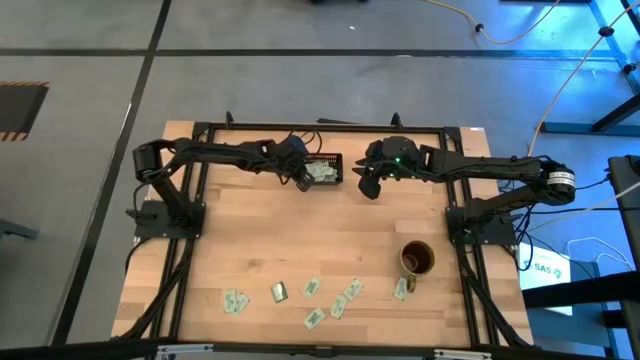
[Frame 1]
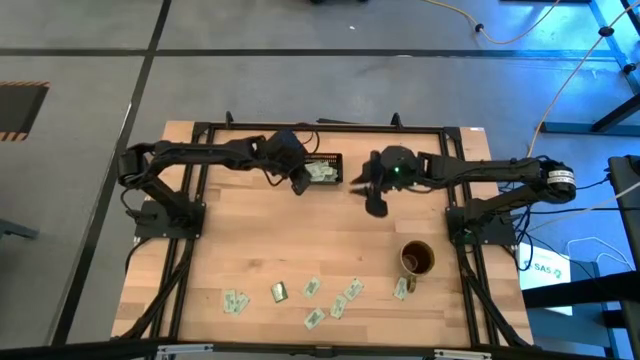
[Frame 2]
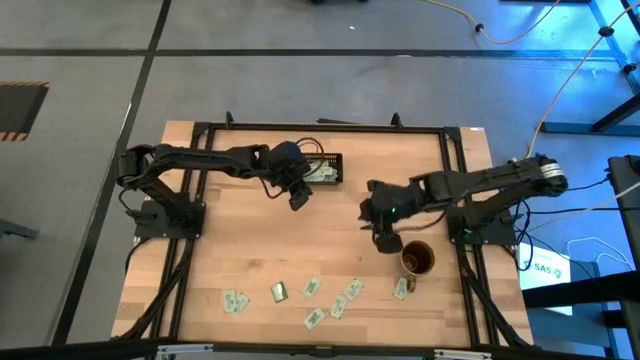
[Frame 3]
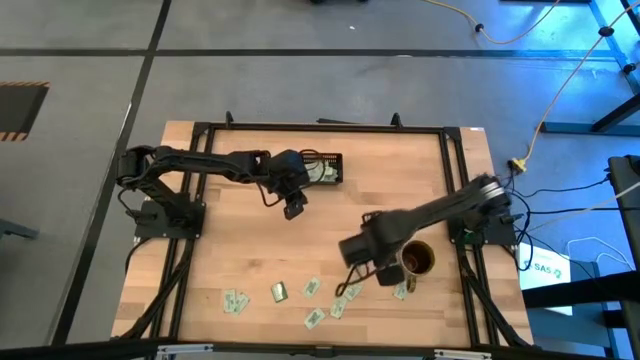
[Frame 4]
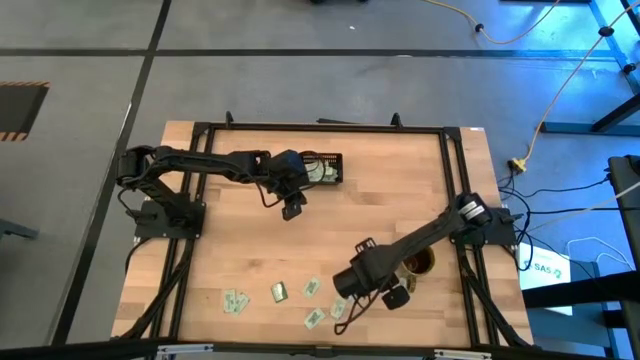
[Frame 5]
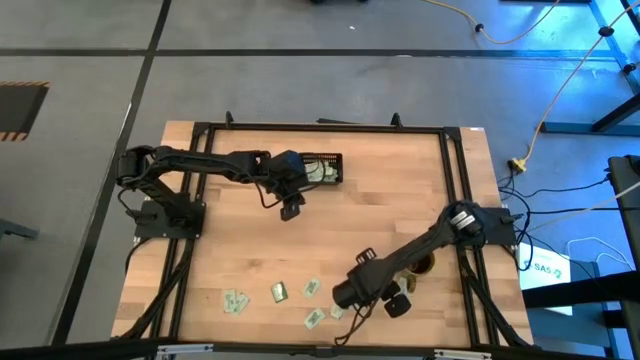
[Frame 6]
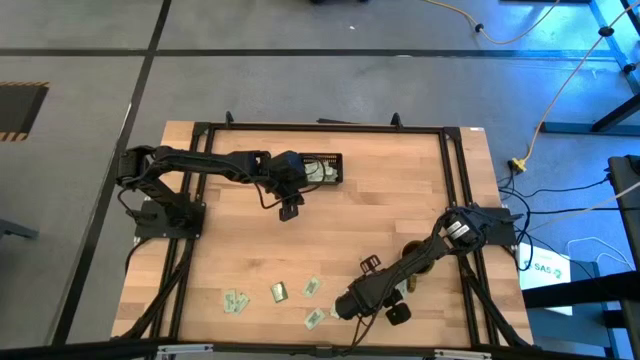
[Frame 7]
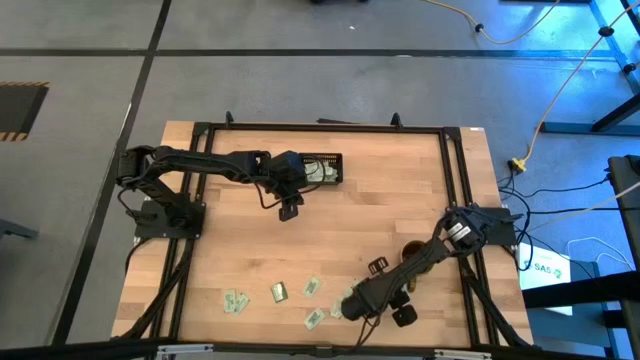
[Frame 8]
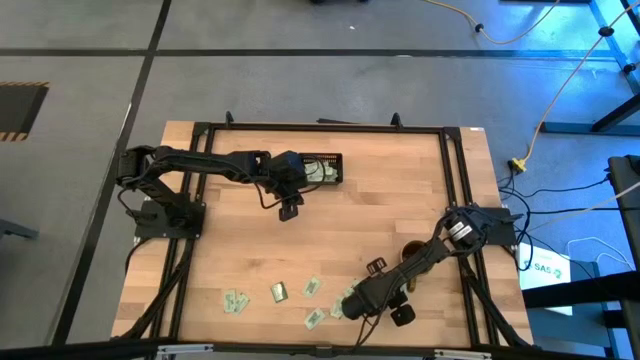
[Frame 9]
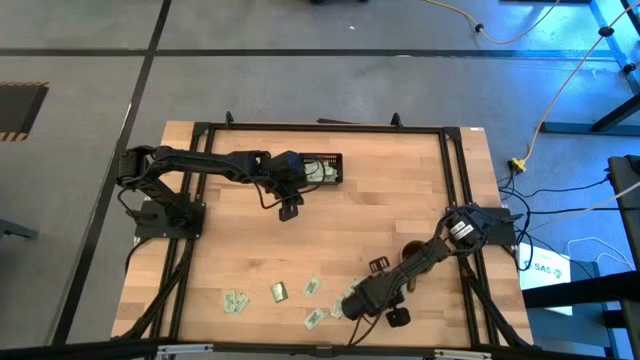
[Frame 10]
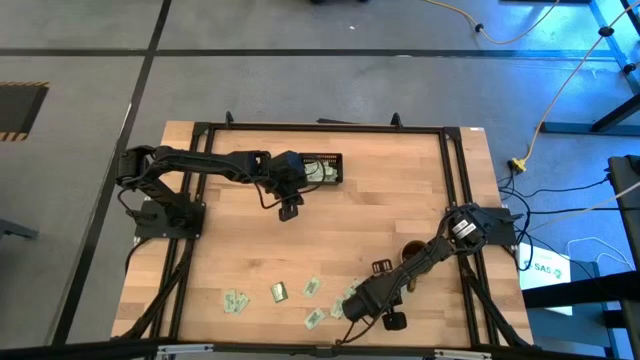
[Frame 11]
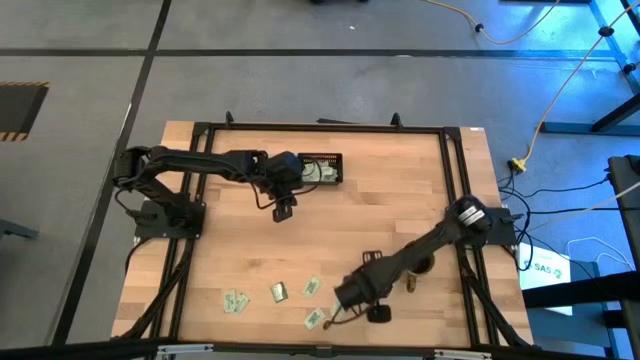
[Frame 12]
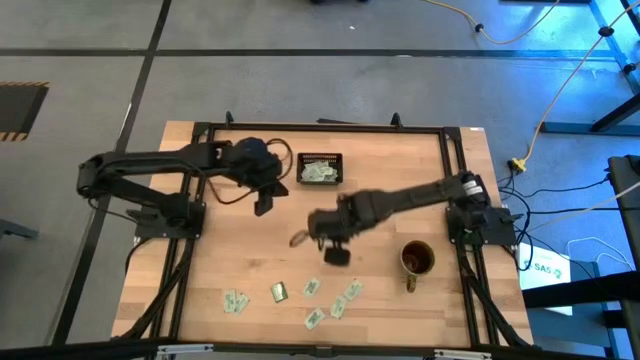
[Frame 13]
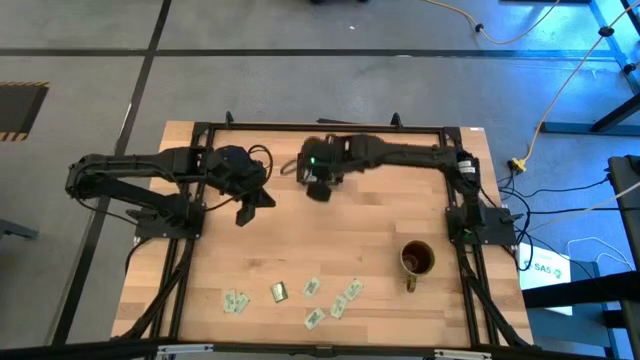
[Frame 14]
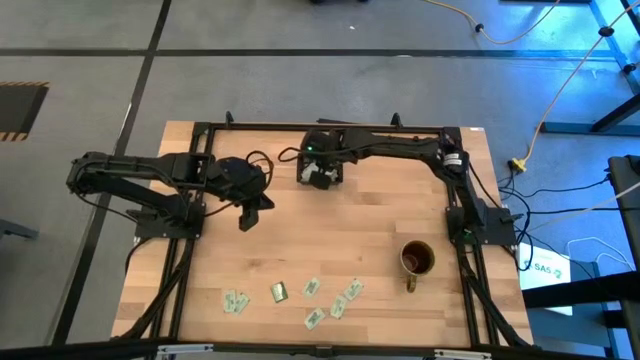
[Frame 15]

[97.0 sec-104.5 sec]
Task: Pick and place Stevia / Truvia into bins
Put the white stevia packet into the black bin

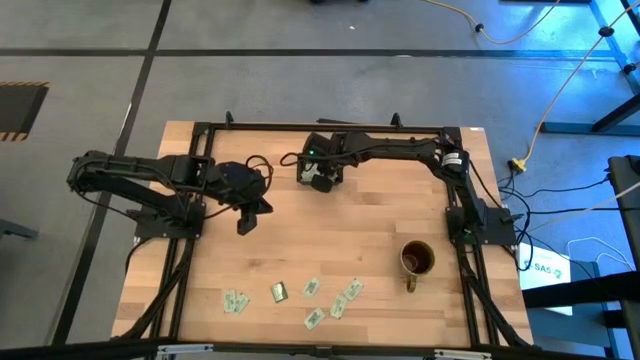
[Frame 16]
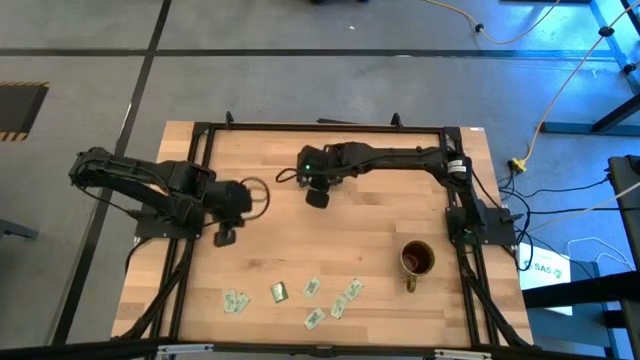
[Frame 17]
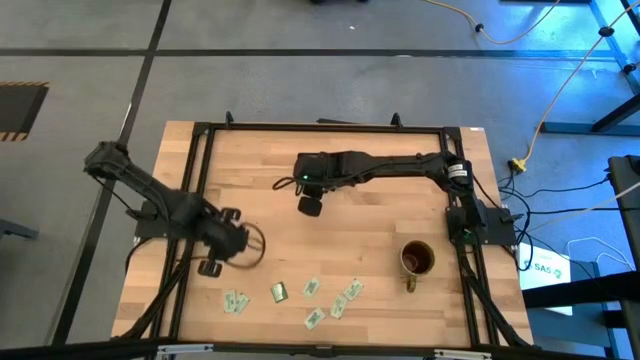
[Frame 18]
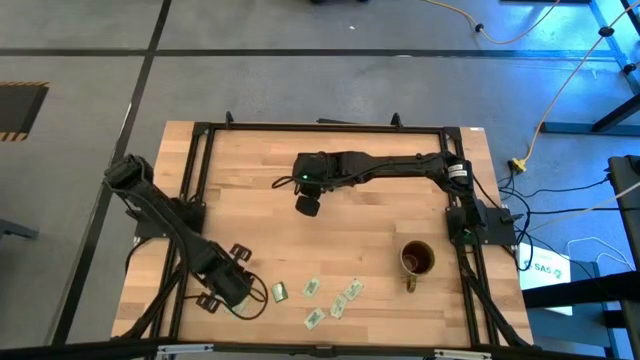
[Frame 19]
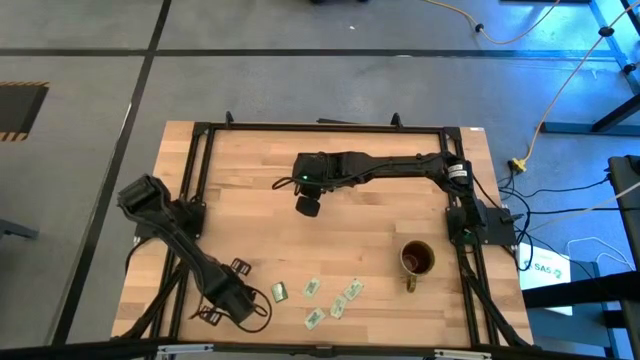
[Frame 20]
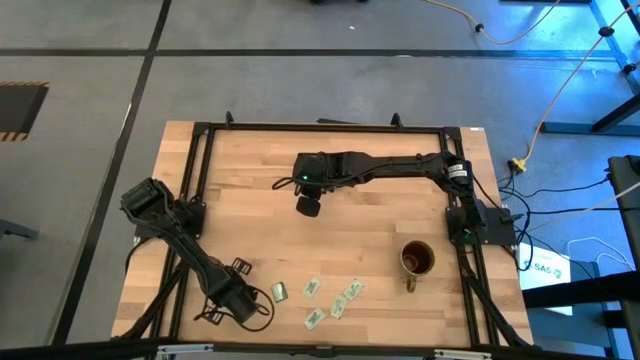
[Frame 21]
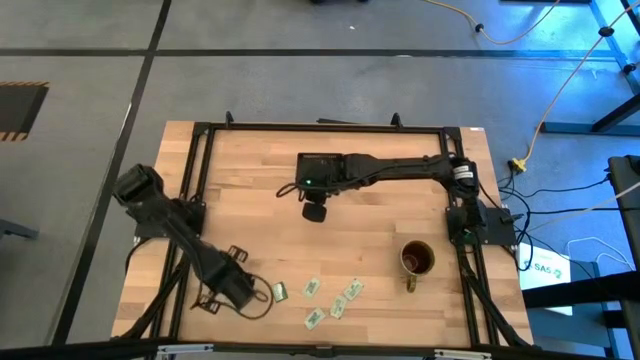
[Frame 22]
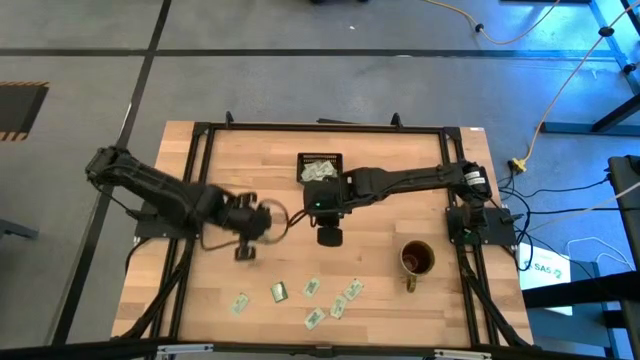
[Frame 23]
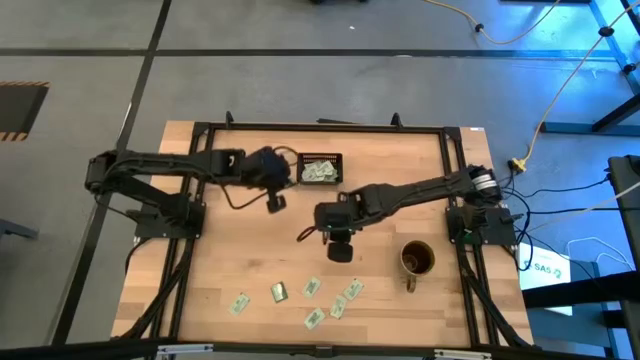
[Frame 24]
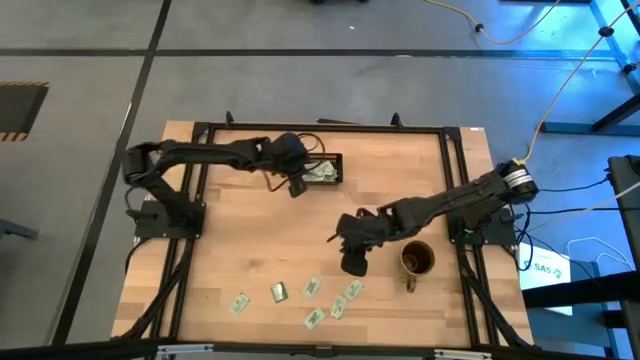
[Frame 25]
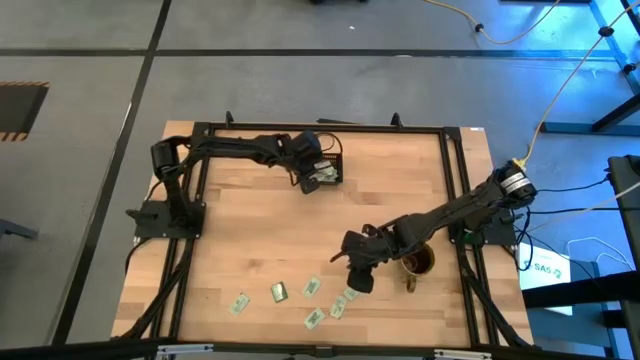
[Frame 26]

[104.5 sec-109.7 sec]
Put the white stevia packet into the black bin

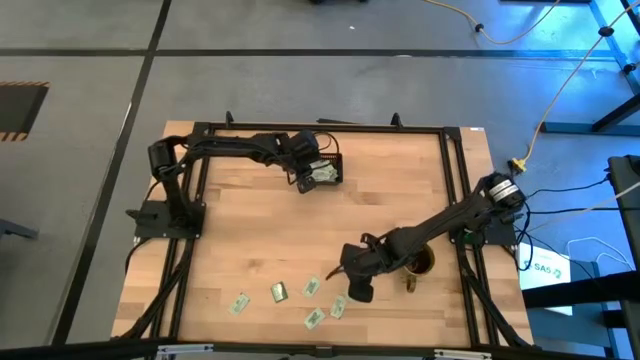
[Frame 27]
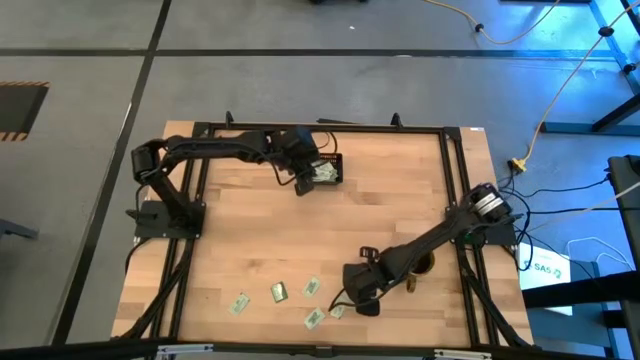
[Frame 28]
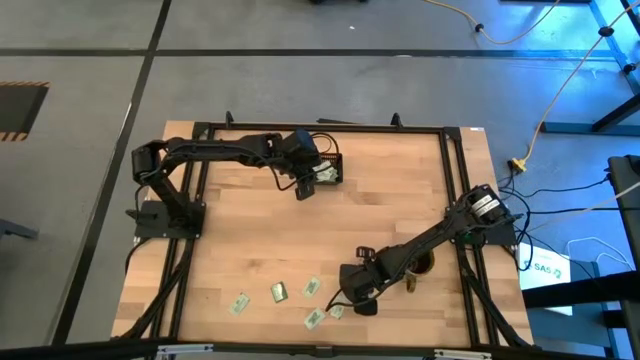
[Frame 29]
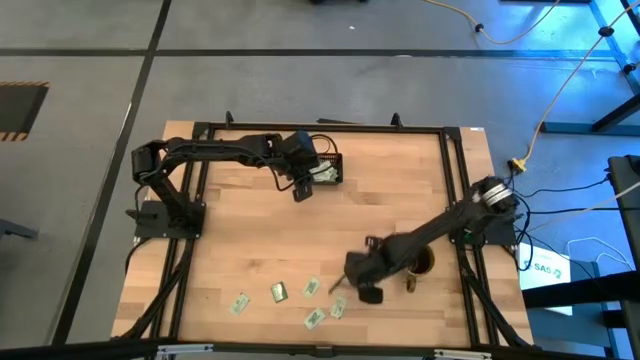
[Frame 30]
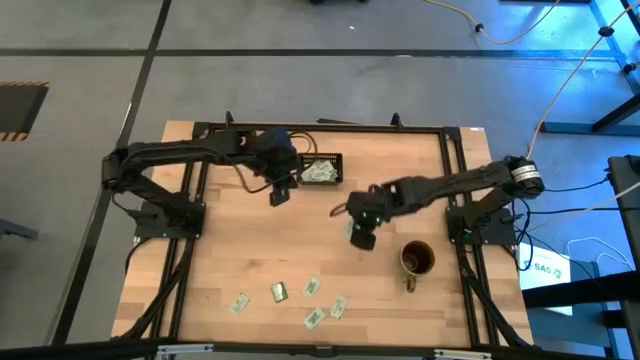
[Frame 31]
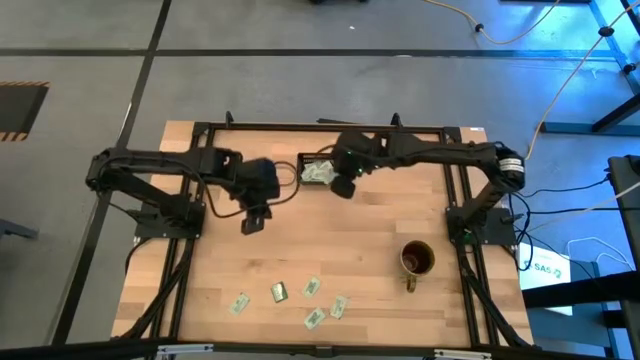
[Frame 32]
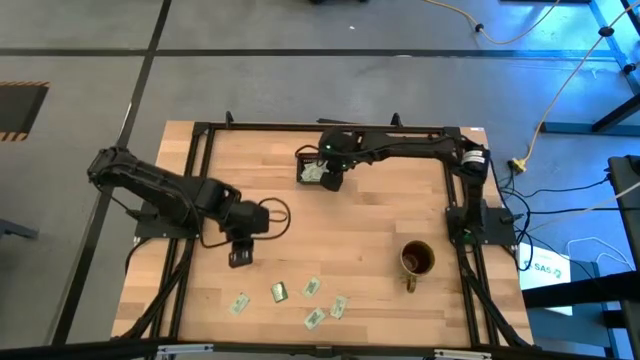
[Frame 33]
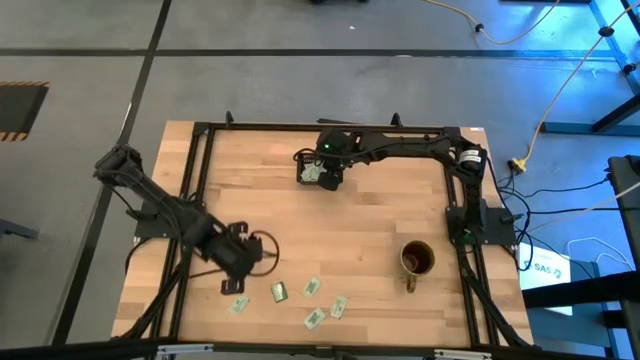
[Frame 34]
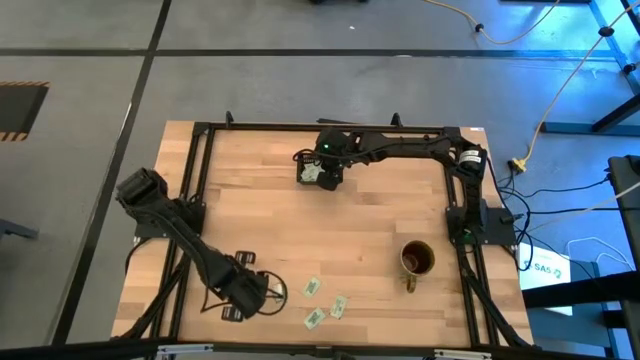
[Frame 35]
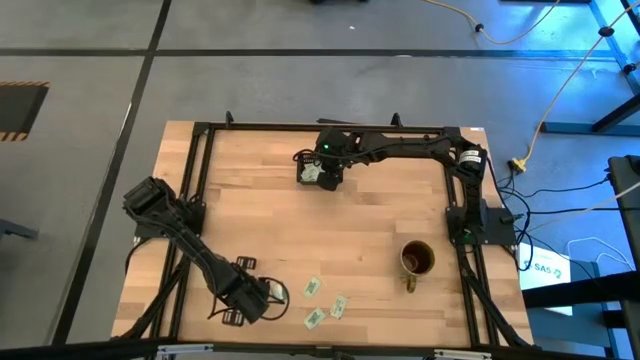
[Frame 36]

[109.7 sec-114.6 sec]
Put the white stevia packet into the black bin

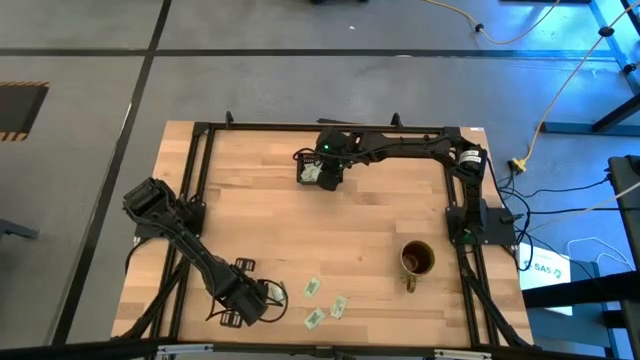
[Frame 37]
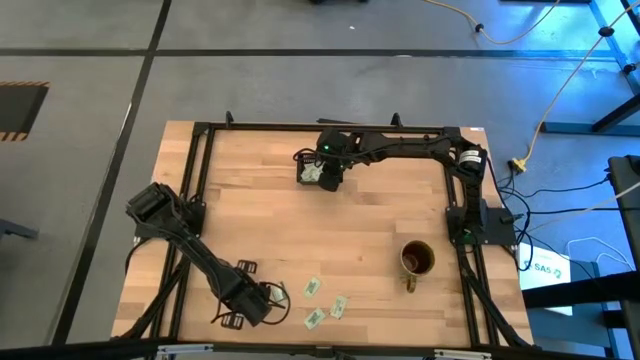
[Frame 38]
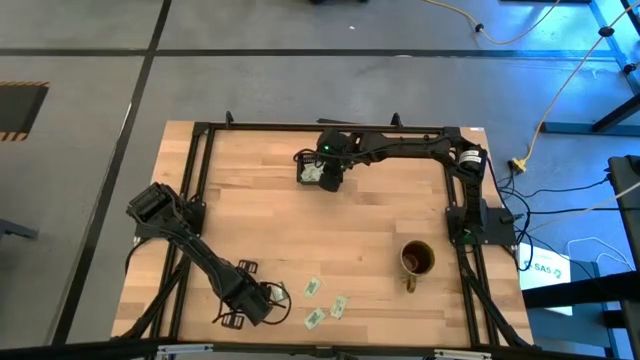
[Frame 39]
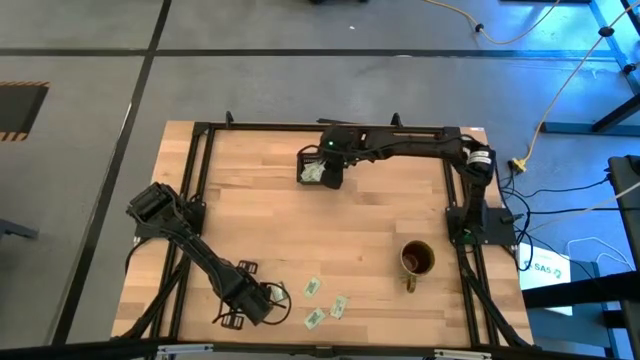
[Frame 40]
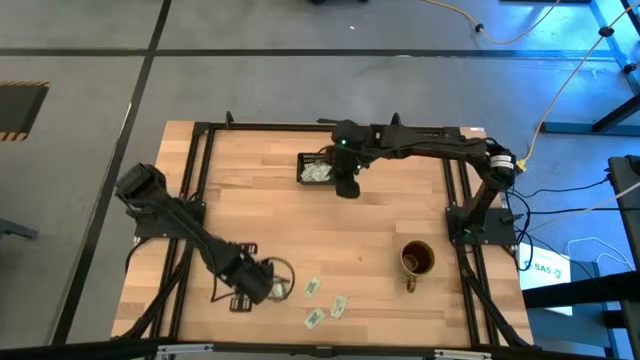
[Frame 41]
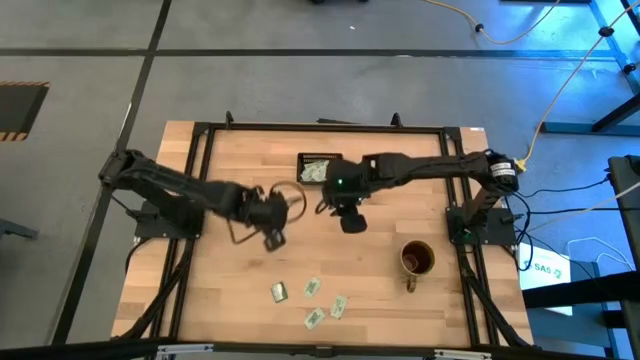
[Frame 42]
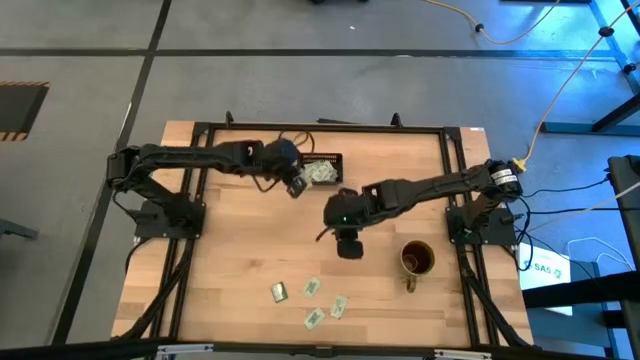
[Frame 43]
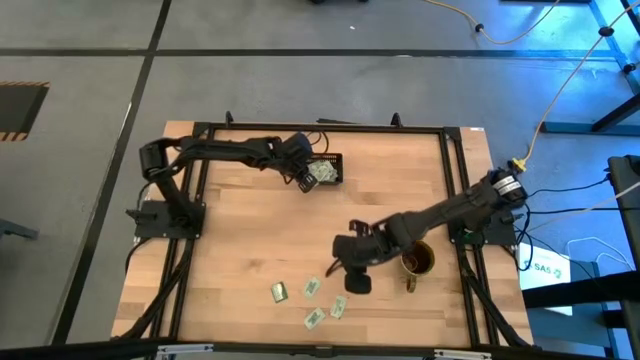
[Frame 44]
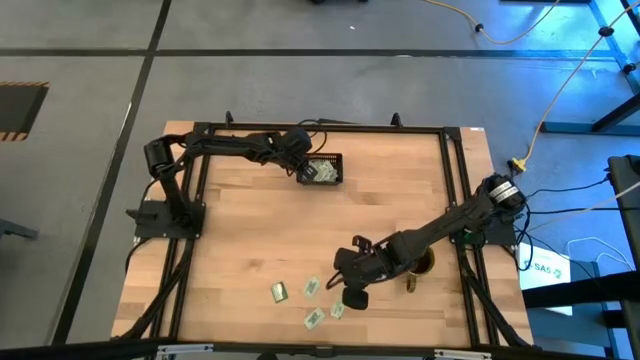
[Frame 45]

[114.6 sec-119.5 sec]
Put the white stevia packet into the black bin
